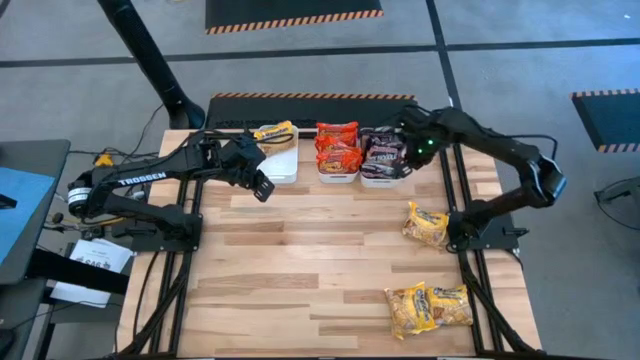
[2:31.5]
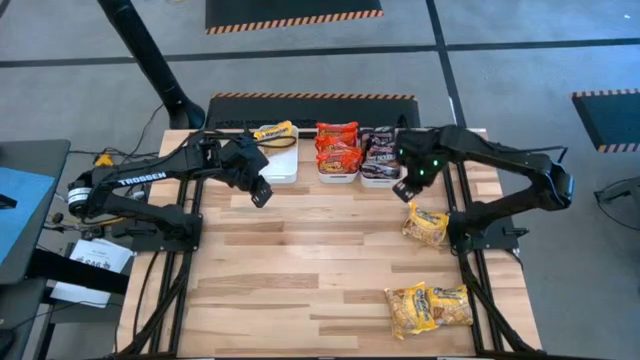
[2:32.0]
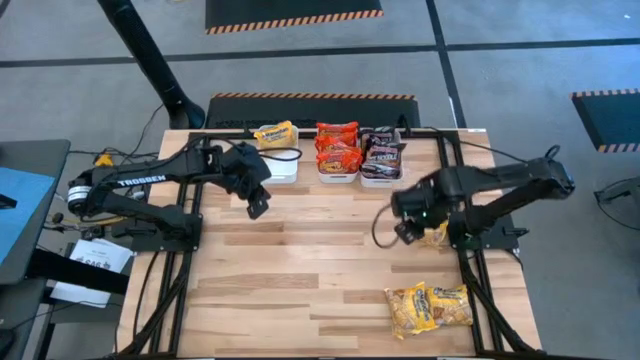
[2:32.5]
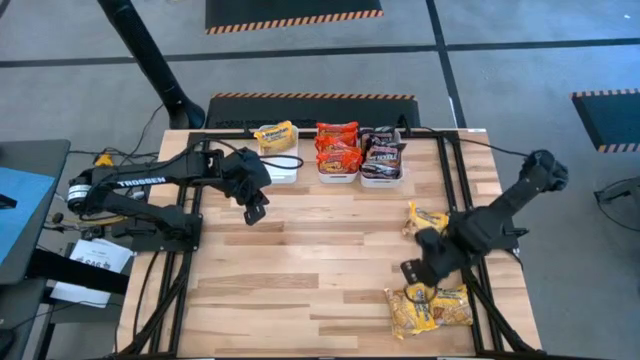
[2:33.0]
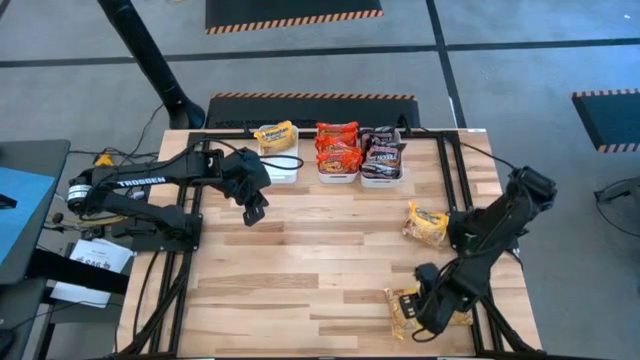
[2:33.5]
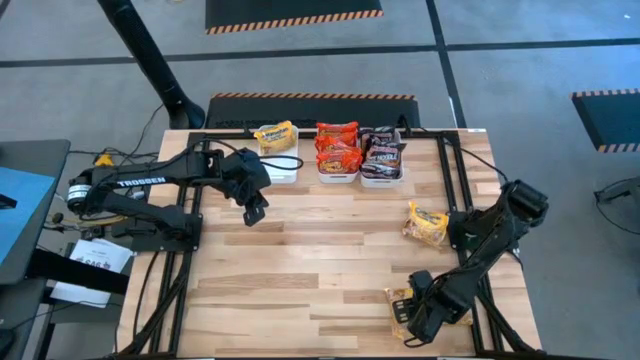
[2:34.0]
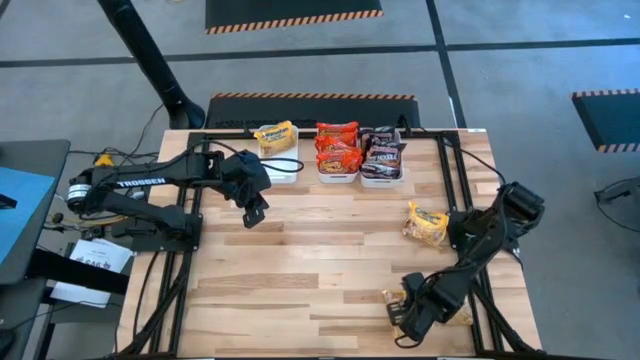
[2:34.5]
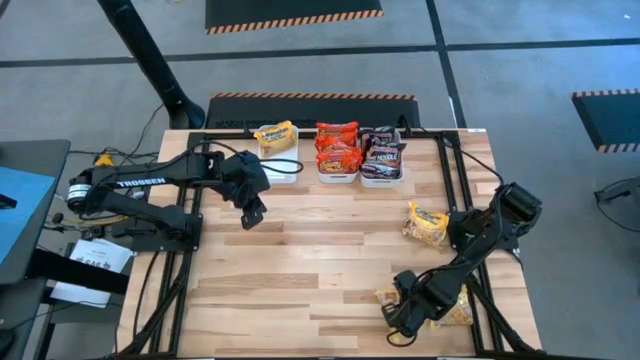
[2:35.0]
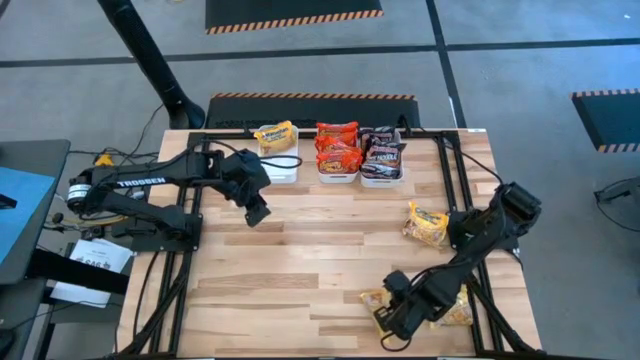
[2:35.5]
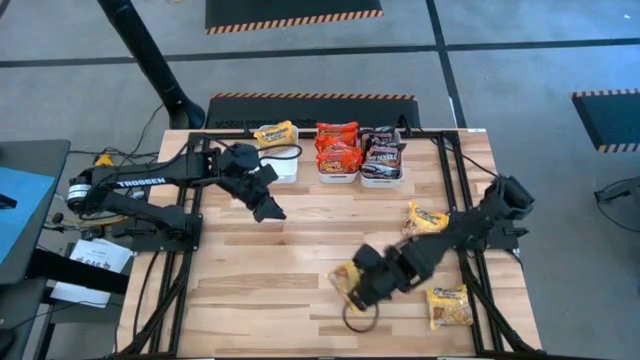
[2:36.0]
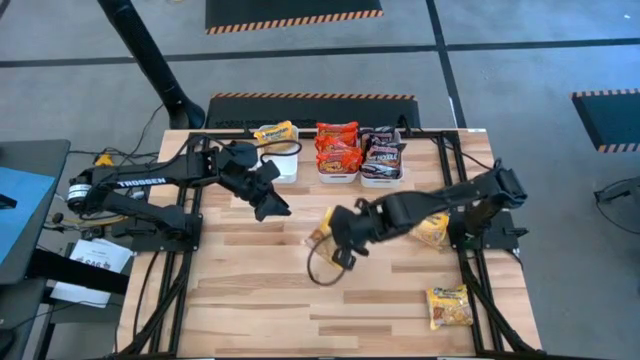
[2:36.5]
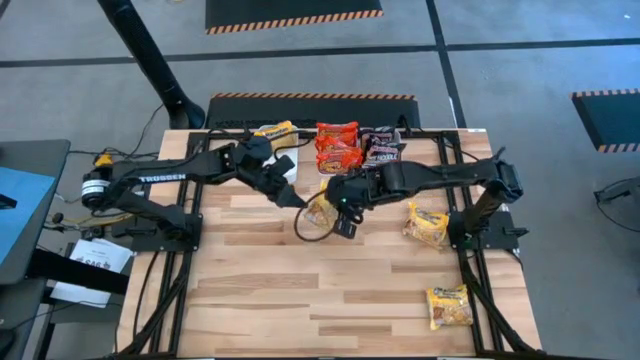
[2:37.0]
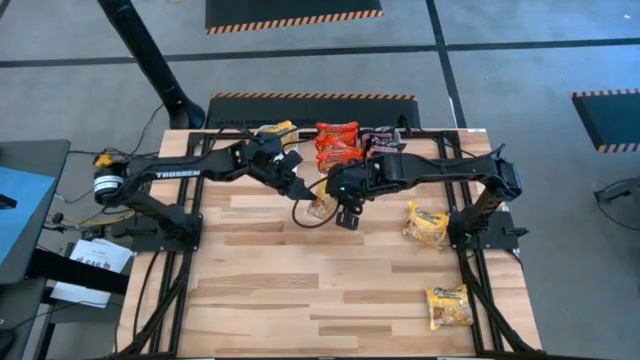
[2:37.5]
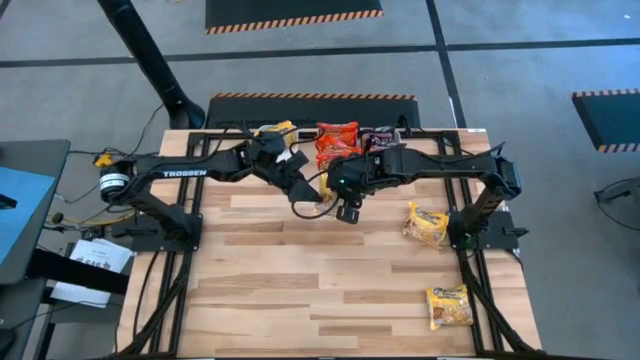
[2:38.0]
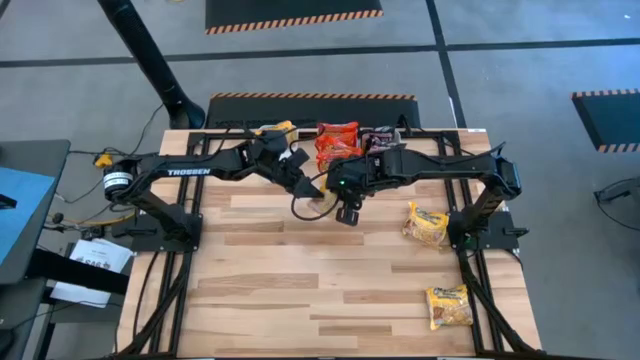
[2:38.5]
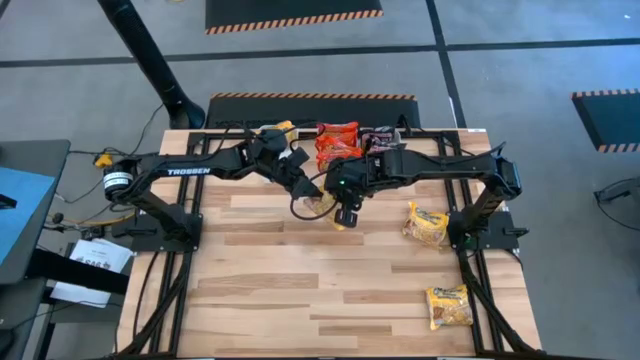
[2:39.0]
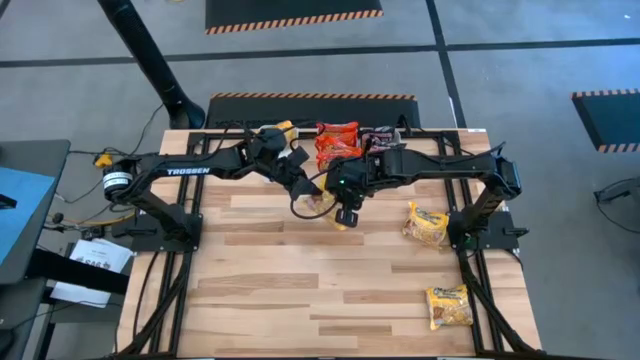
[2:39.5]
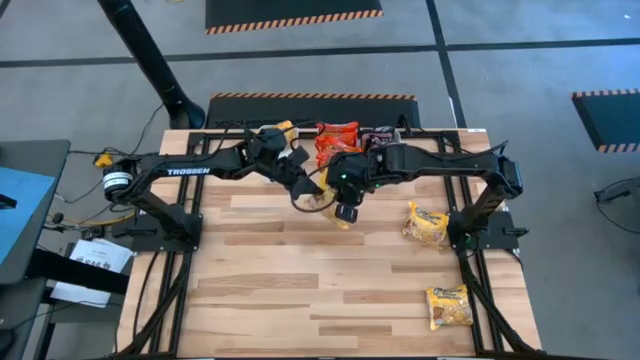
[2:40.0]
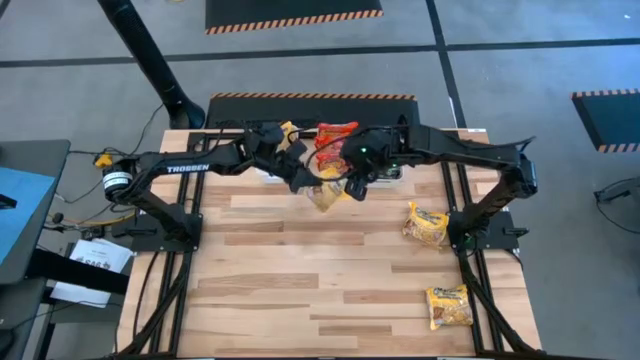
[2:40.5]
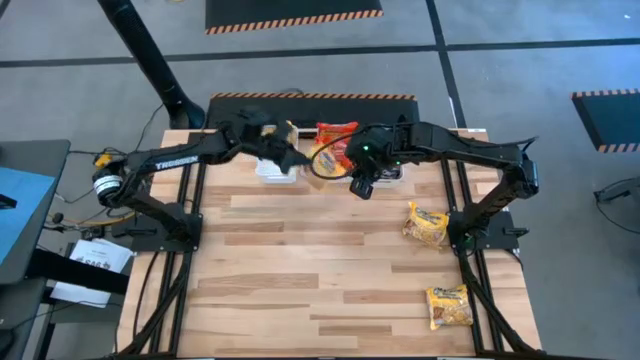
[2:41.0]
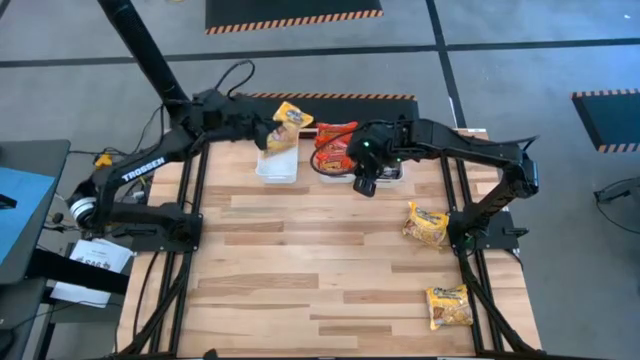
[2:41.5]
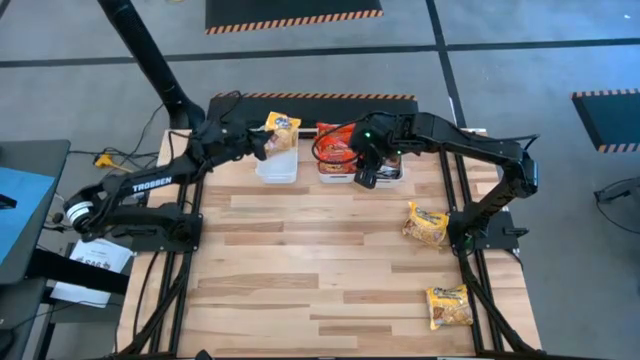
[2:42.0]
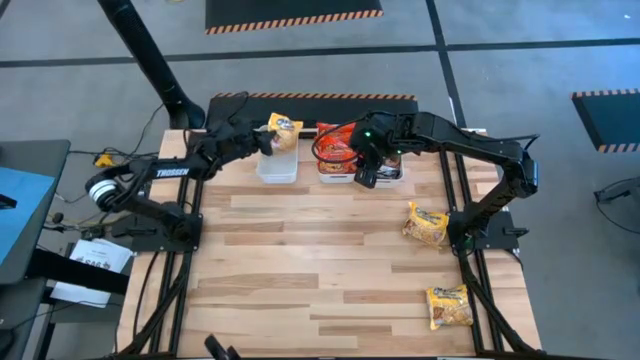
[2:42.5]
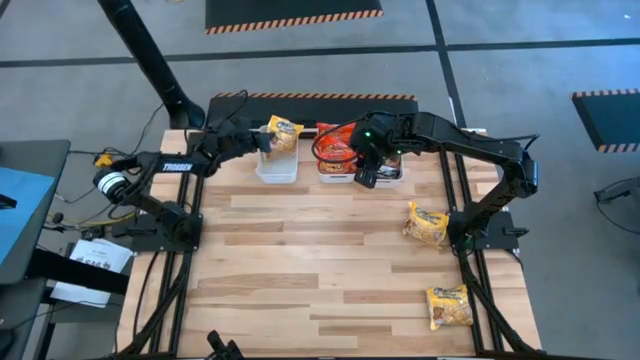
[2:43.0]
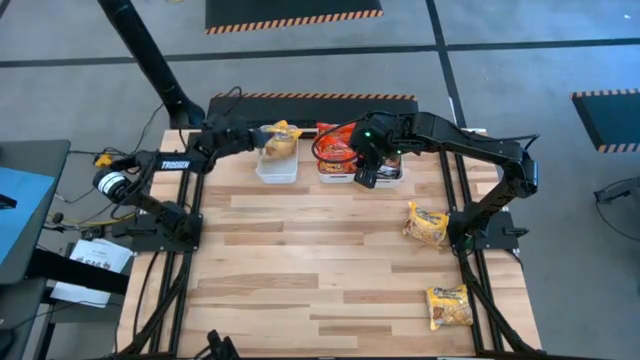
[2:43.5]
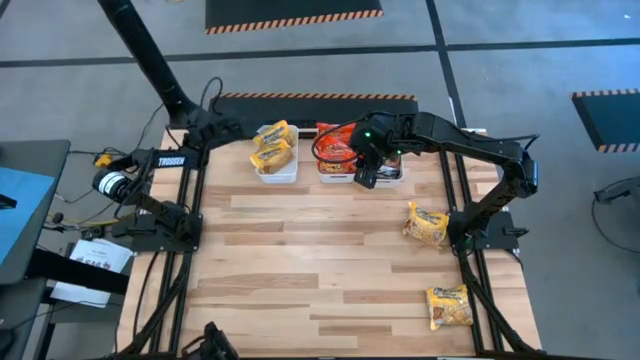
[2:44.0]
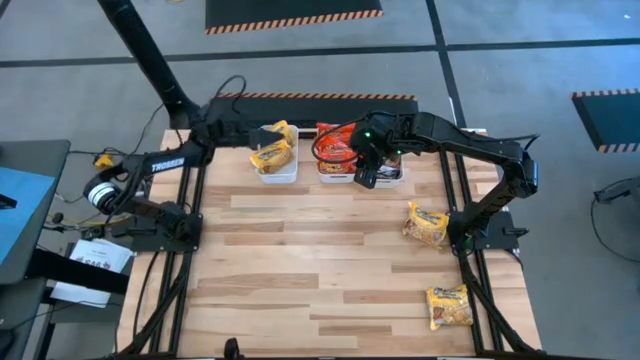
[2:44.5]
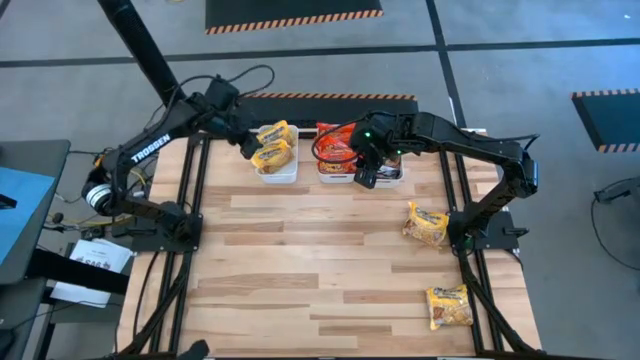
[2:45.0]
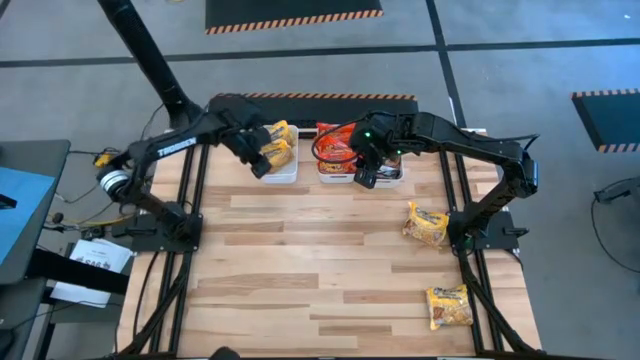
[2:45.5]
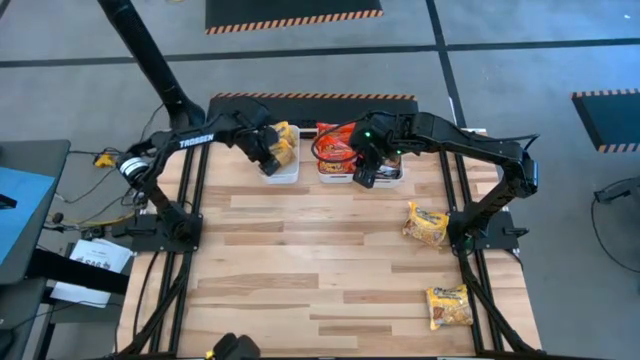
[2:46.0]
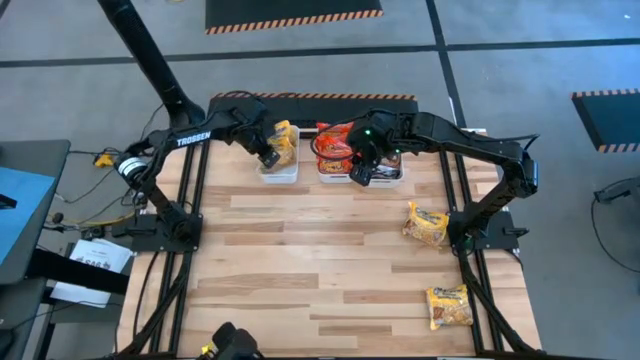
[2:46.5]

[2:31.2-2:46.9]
Task: Sort Maruchan noodles
Put the yellow noodle pack into the left white bin
